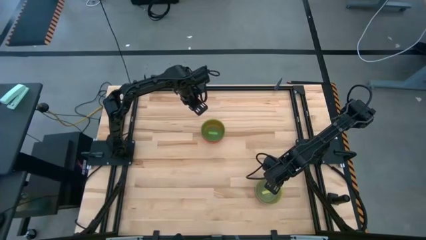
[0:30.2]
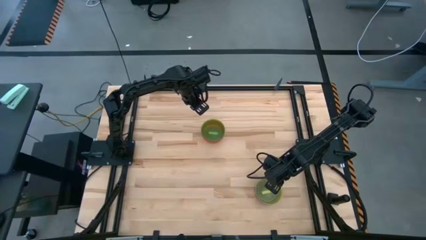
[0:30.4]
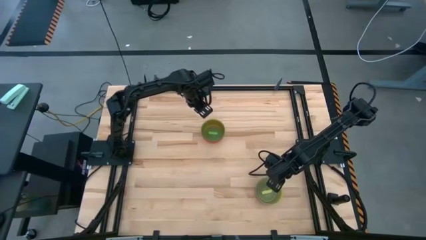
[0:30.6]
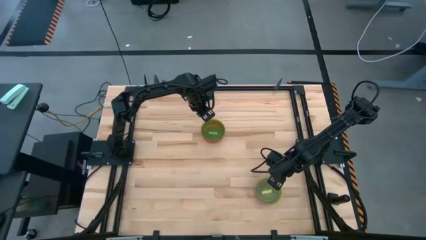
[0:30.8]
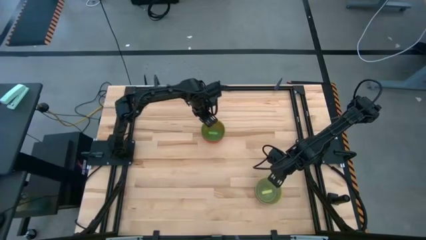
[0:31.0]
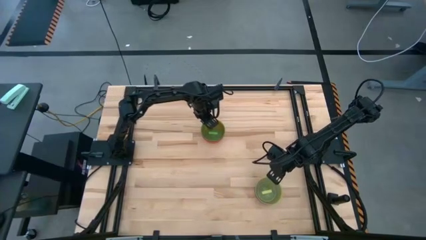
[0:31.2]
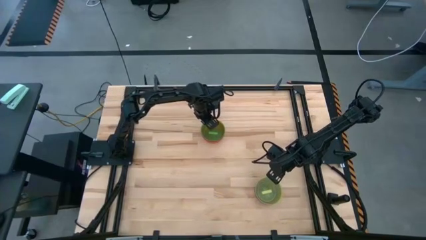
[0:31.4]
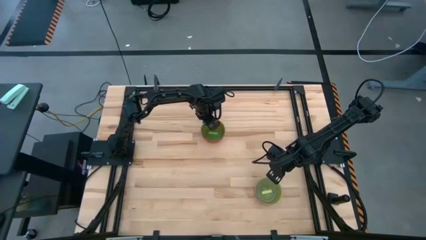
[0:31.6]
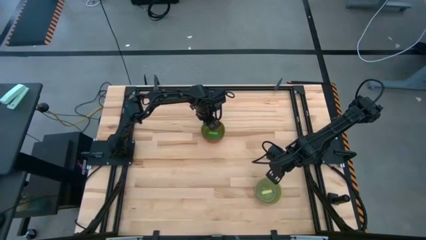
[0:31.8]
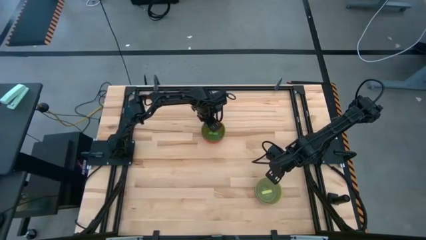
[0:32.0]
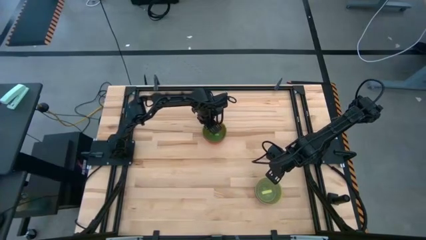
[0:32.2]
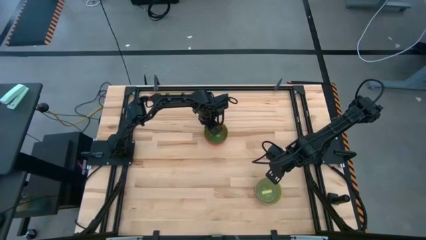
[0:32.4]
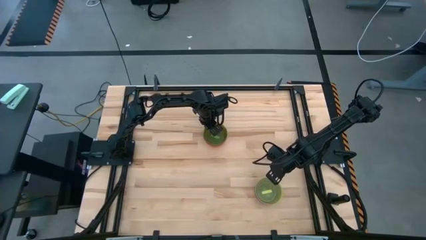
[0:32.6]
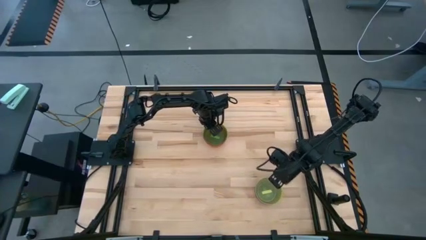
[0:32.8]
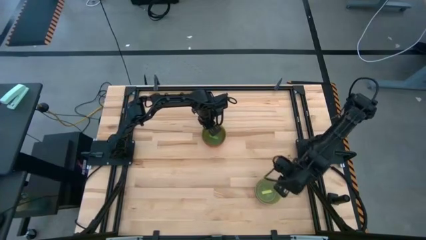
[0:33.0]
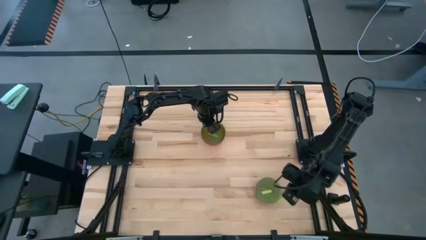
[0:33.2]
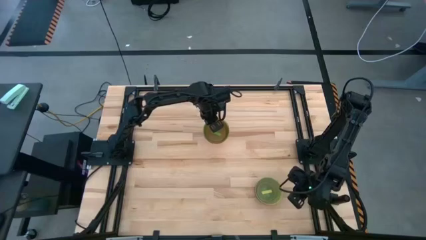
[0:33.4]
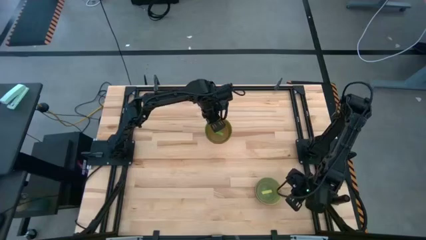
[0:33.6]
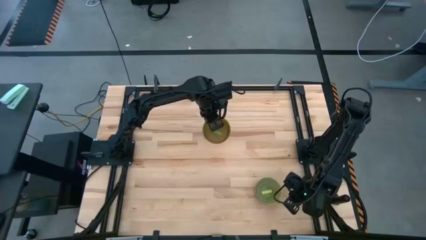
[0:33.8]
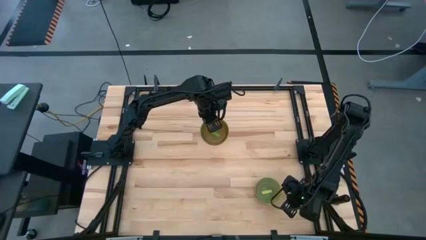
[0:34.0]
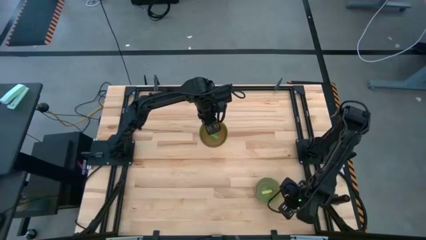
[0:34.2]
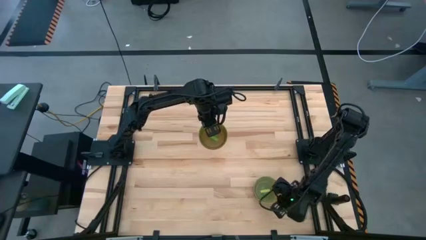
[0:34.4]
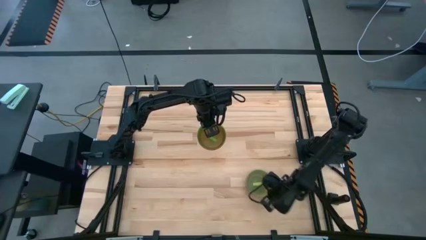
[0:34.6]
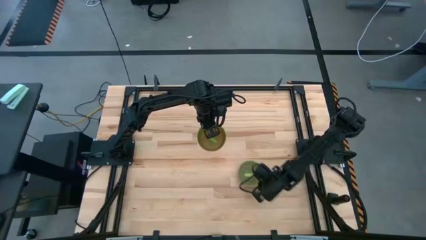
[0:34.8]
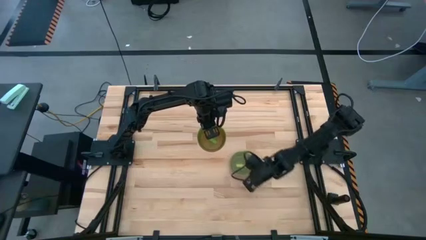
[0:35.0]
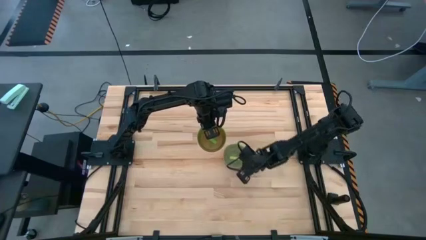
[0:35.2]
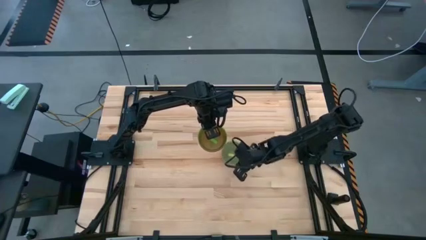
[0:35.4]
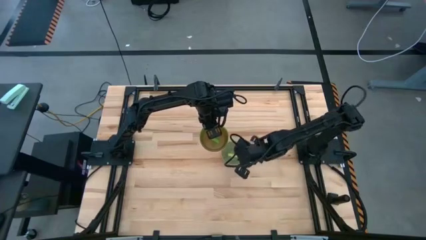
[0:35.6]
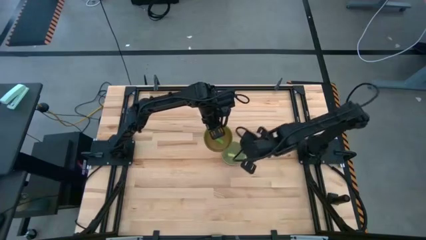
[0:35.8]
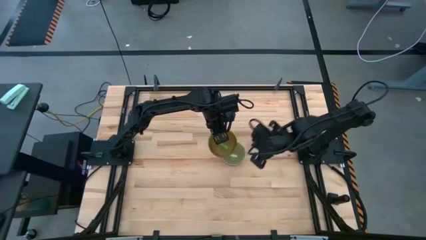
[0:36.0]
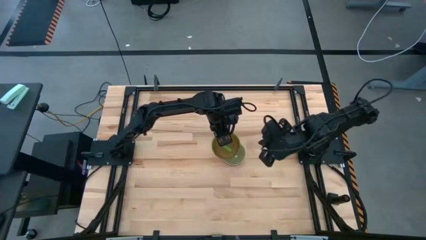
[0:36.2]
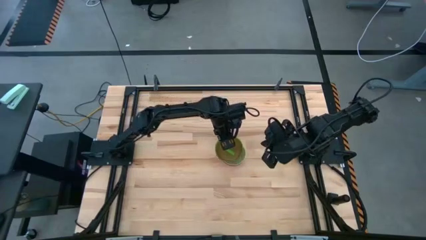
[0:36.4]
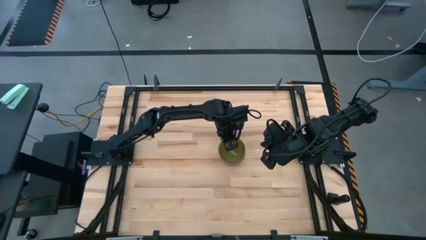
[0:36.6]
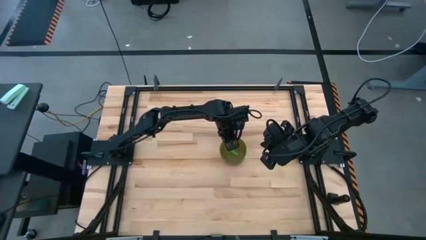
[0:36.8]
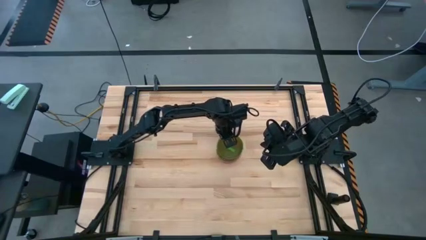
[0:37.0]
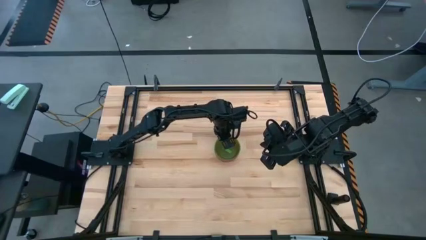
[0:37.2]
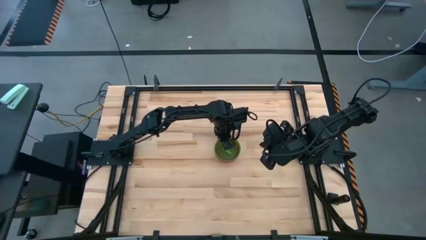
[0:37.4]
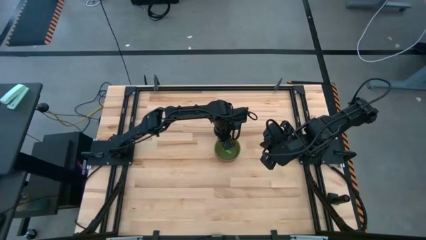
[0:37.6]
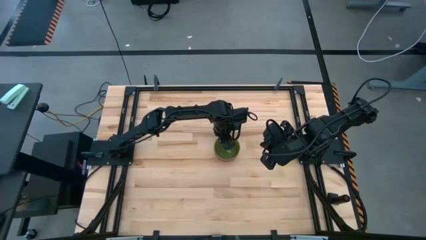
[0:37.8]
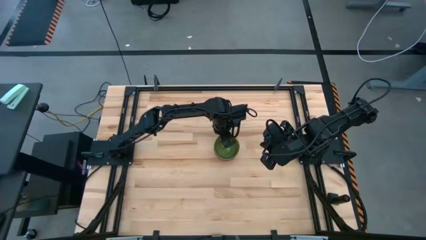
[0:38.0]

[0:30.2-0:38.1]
Task: Nest bowls inside each other
Stack the top stacked bowls on top of the bottom stacked bowls

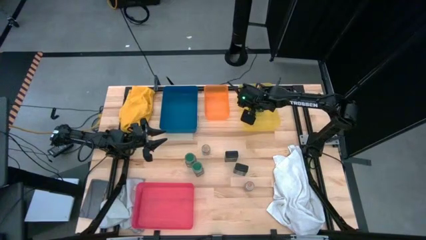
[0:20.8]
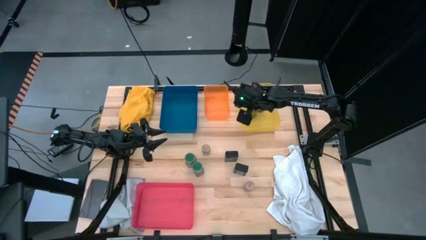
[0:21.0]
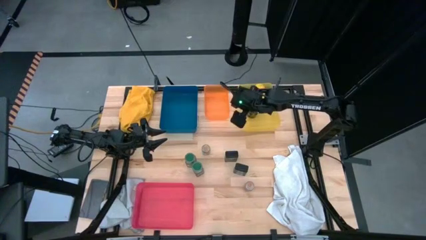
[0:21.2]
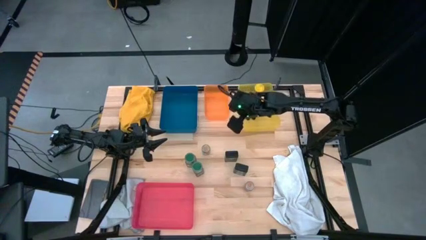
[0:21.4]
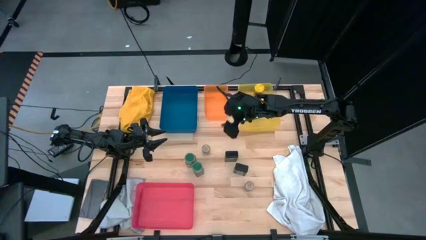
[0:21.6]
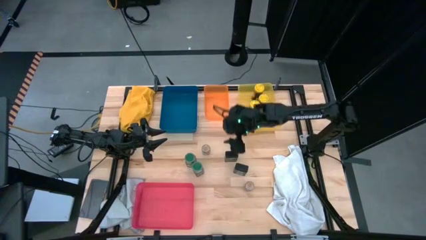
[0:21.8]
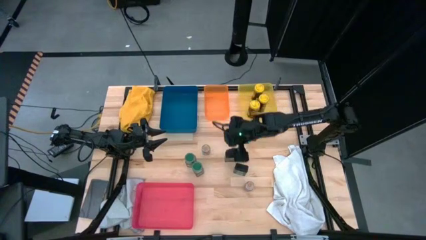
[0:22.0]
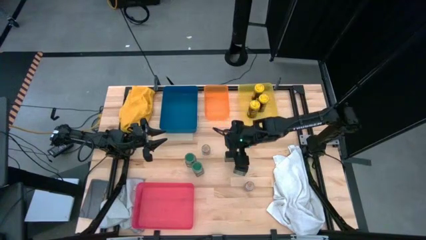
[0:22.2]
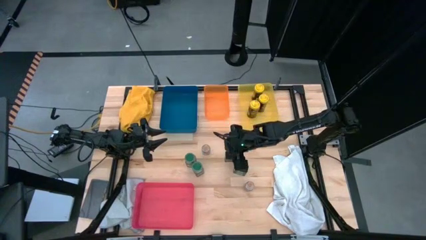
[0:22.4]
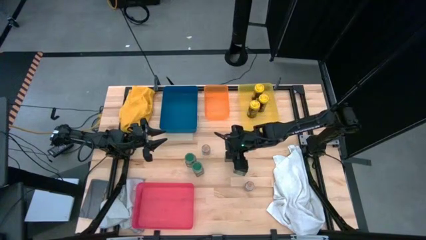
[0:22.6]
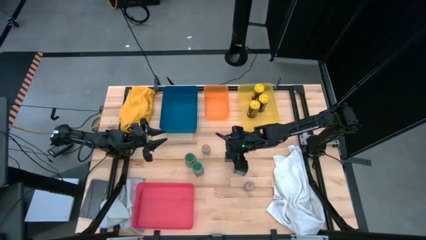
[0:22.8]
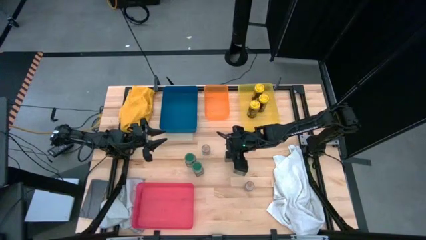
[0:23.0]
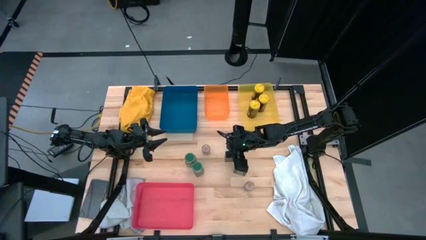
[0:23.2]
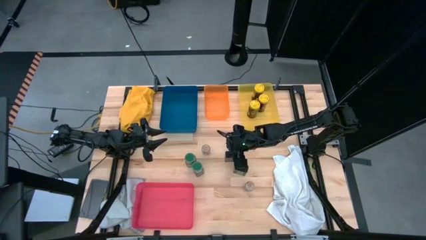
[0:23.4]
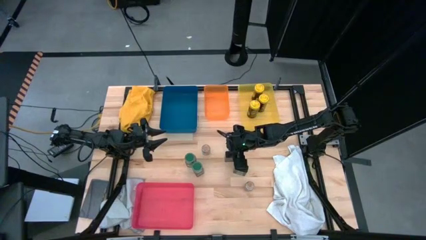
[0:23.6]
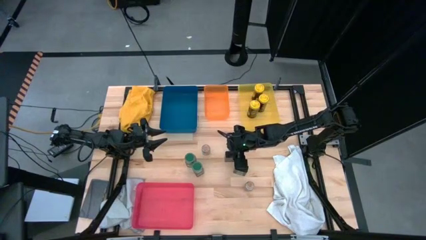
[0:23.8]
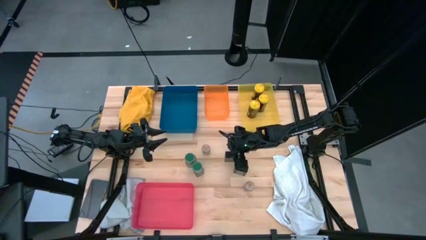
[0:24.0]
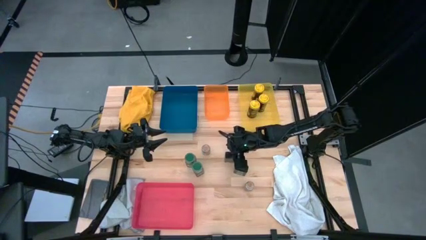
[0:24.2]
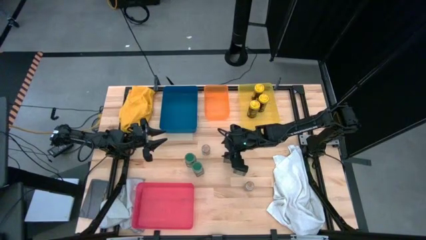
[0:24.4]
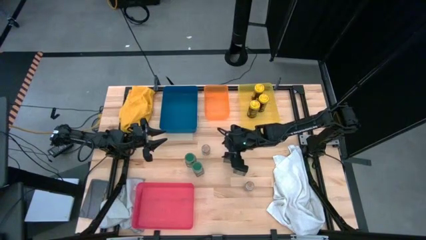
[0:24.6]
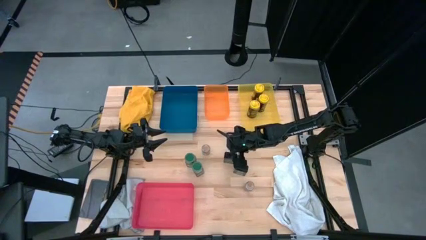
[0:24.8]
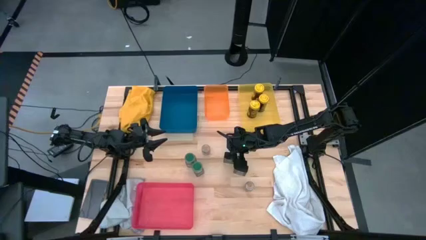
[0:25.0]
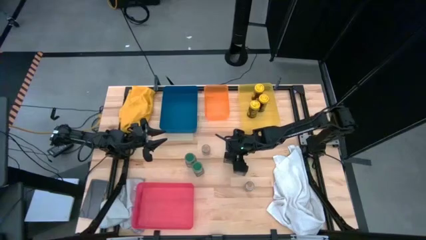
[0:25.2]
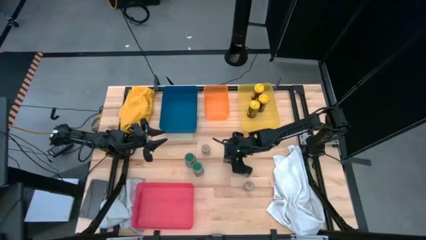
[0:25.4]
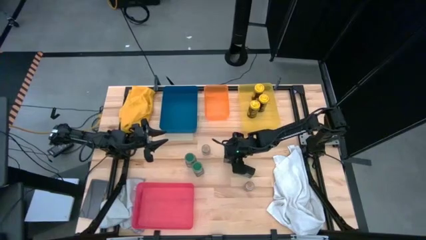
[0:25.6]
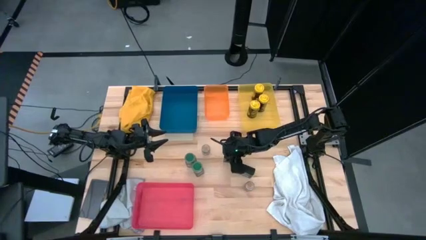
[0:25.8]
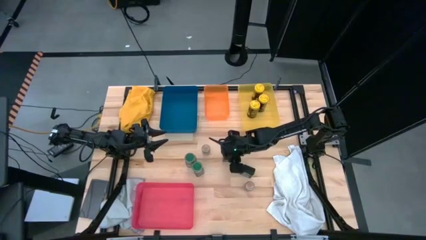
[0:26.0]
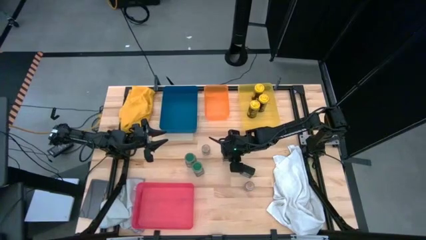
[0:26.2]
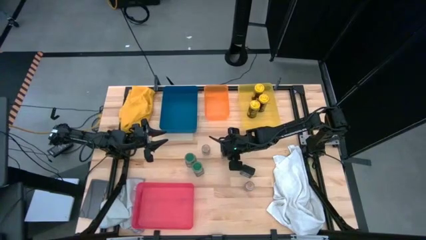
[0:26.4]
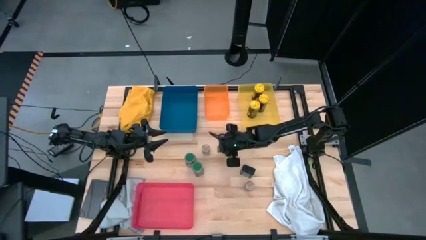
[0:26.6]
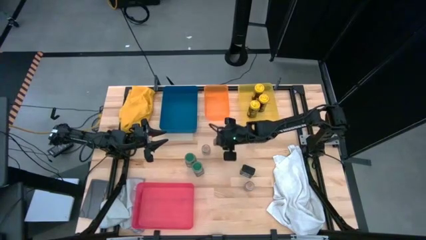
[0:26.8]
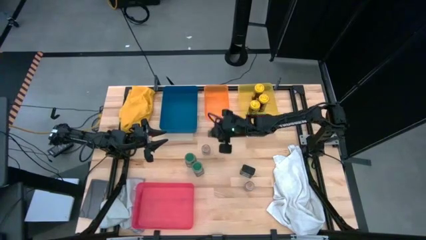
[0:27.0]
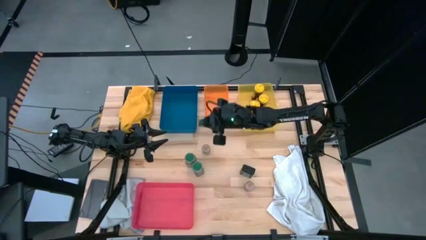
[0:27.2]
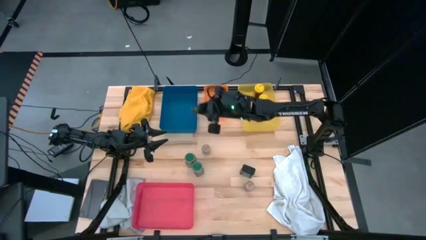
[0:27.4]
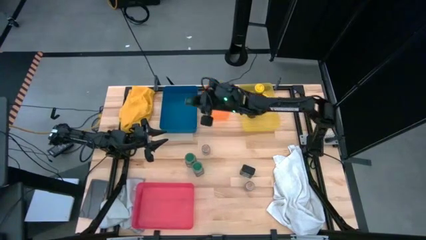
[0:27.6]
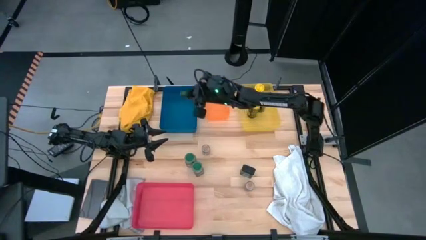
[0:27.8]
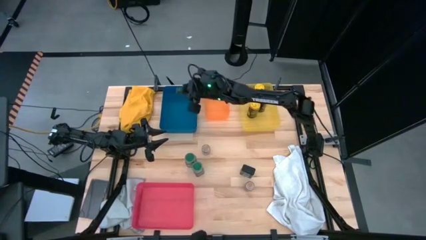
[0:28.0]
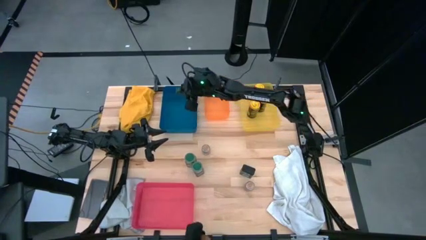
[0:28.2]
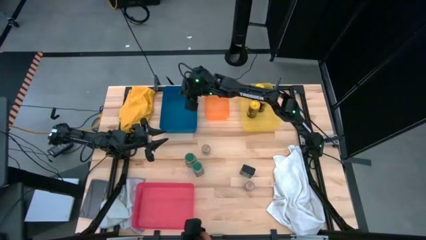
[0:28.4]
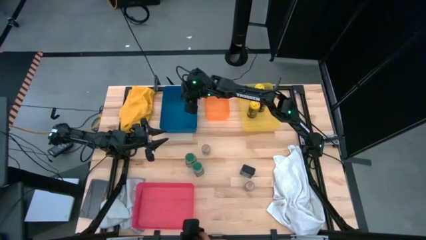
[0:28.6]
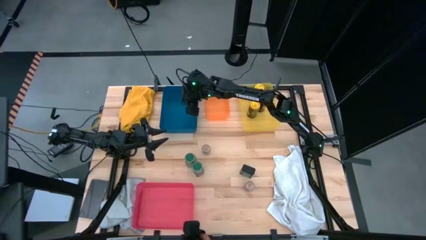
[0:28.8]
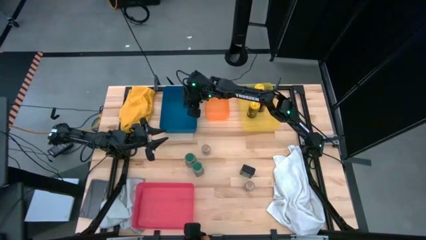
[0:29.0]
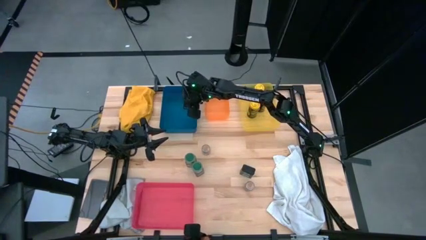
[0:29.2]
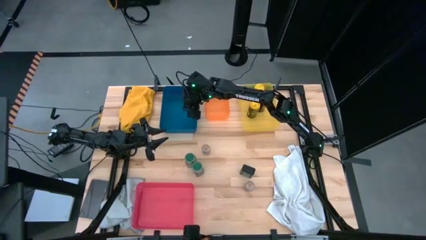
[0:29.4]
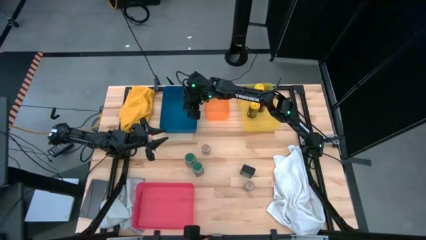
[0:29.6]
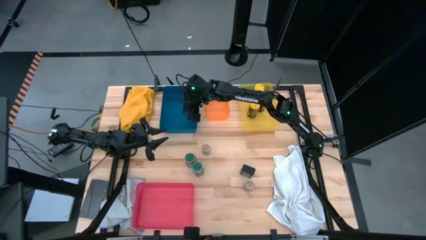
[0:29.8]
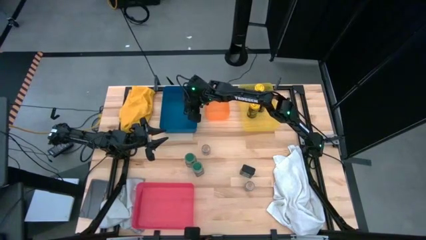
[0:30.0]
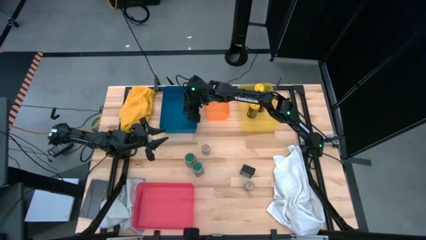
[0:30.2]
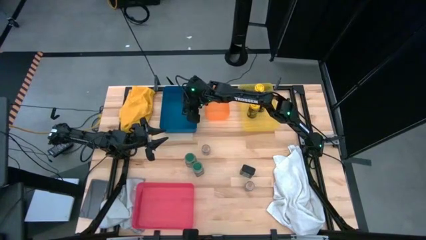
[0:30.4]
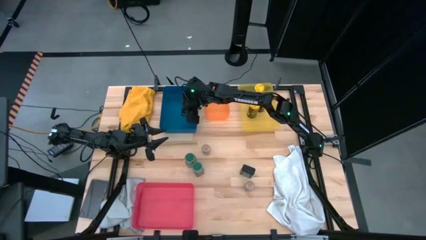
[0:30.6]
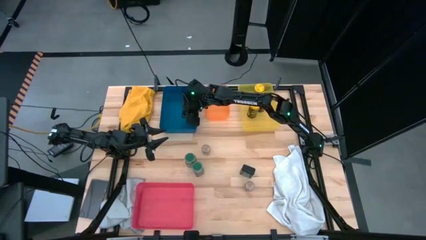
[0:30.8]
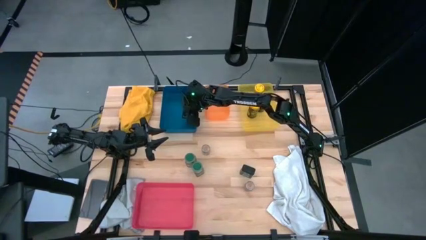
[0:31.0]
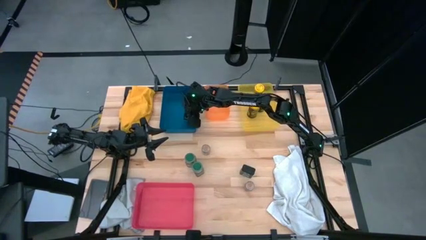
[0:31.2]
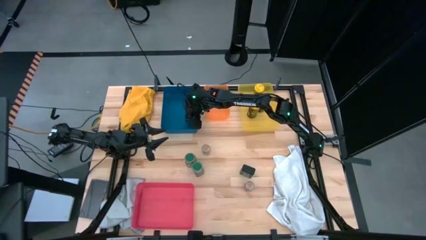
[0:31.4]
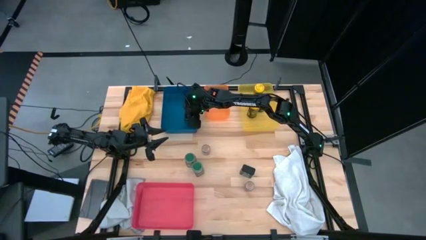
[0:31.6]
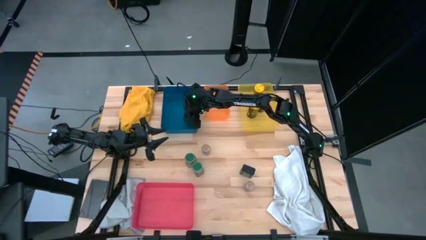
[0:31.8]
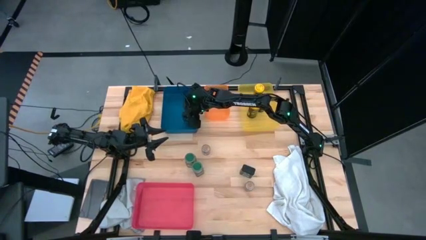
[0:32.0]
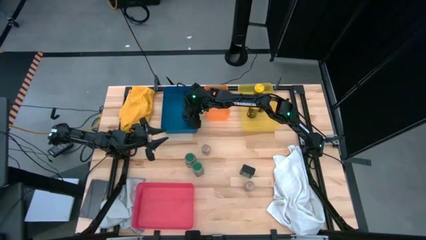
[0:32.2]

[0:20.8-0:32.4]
Task: Sort spices by type
Put the top black seasoning can into the blue bin
